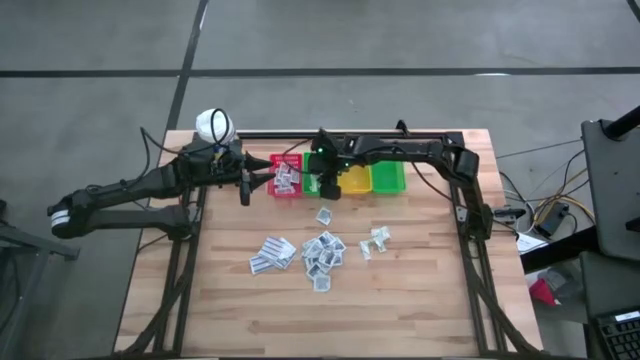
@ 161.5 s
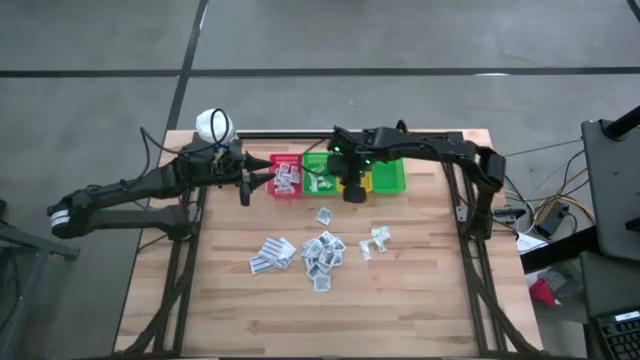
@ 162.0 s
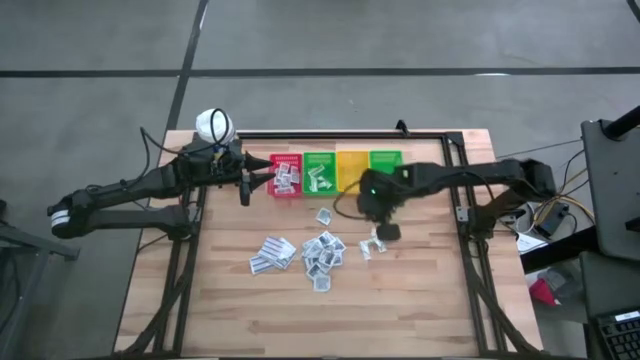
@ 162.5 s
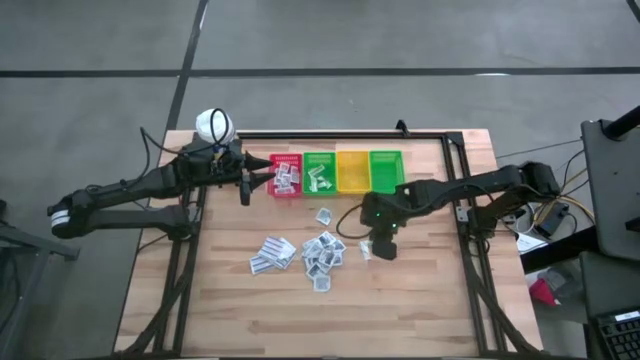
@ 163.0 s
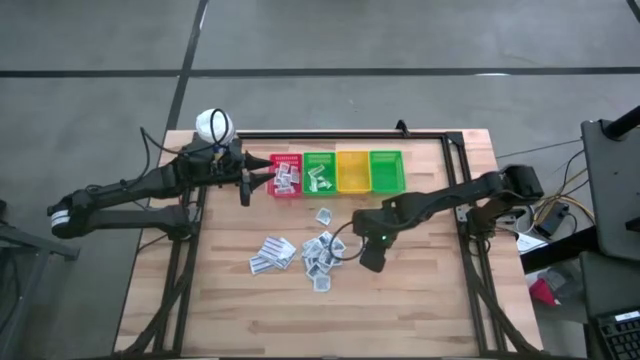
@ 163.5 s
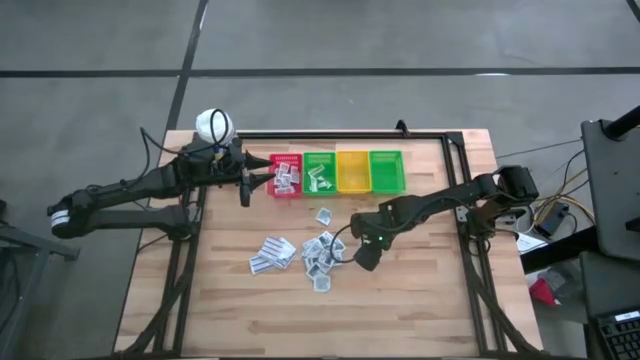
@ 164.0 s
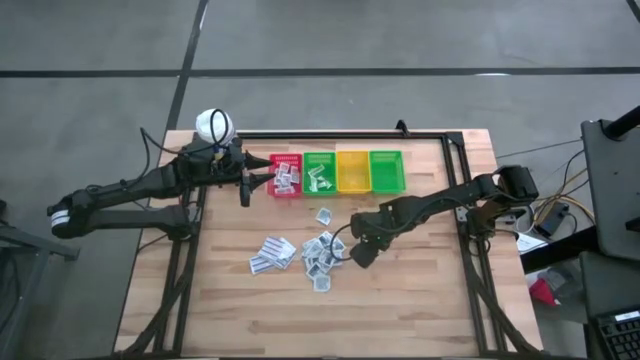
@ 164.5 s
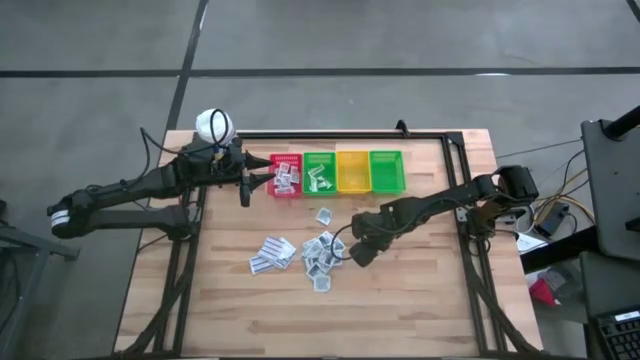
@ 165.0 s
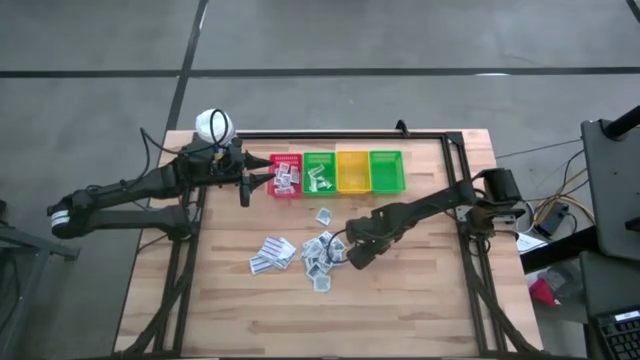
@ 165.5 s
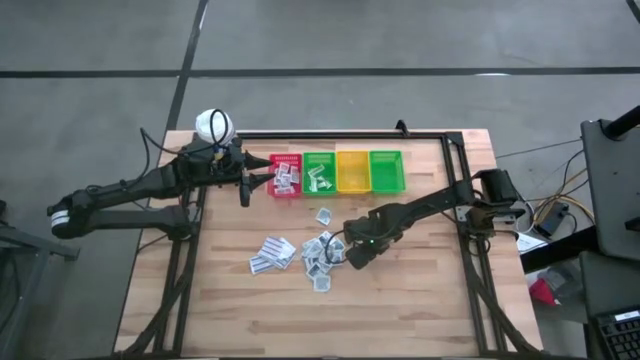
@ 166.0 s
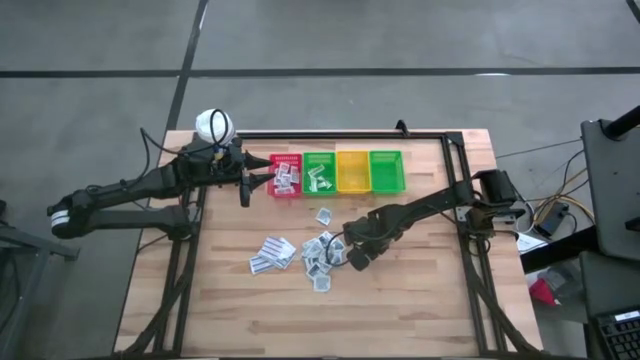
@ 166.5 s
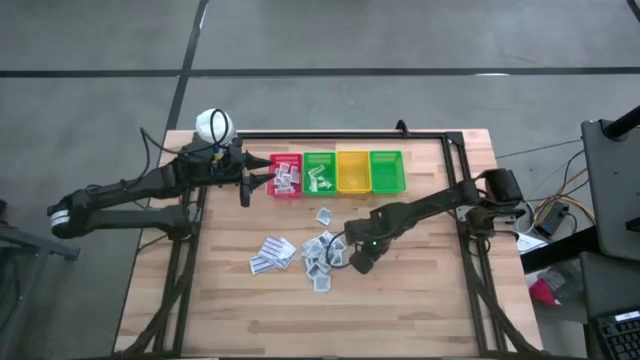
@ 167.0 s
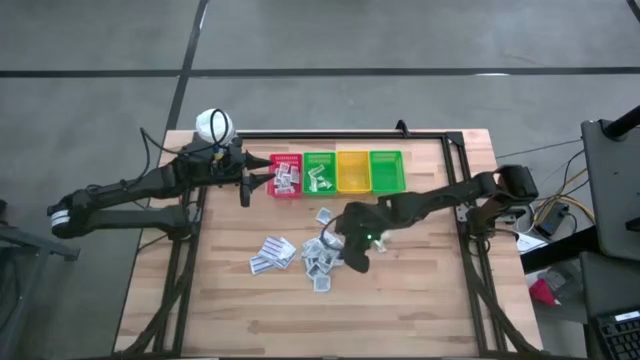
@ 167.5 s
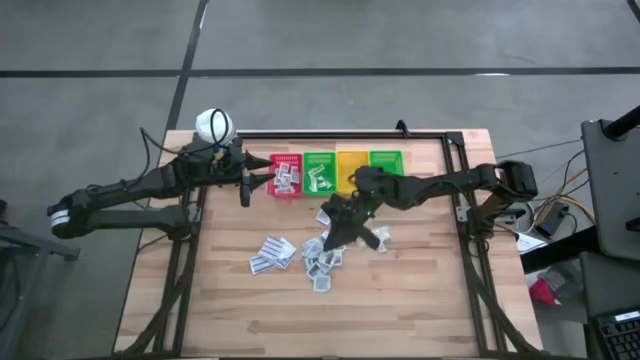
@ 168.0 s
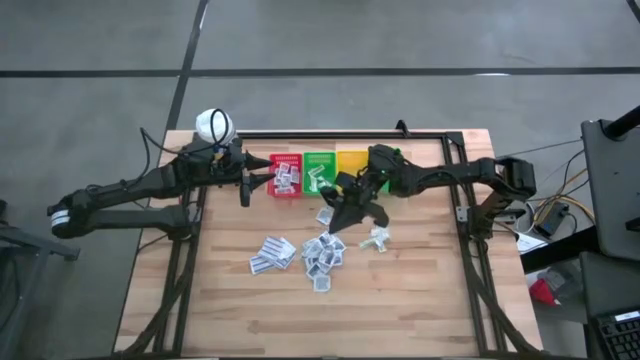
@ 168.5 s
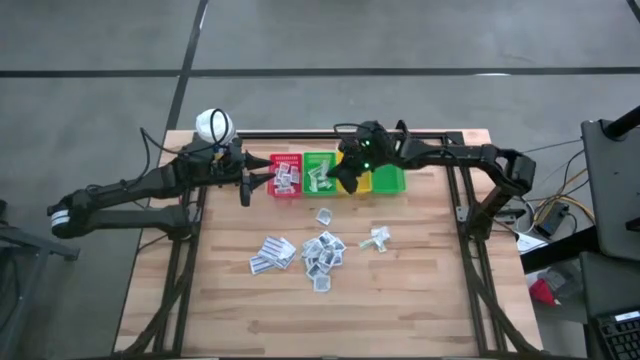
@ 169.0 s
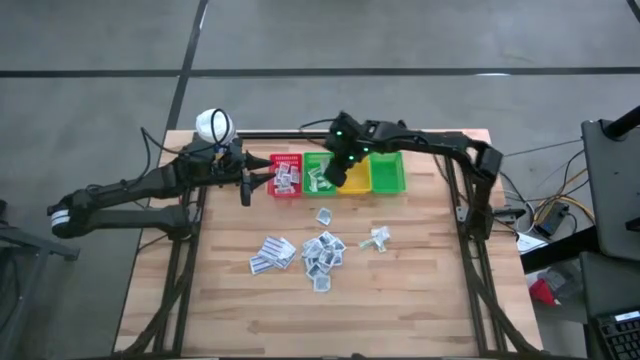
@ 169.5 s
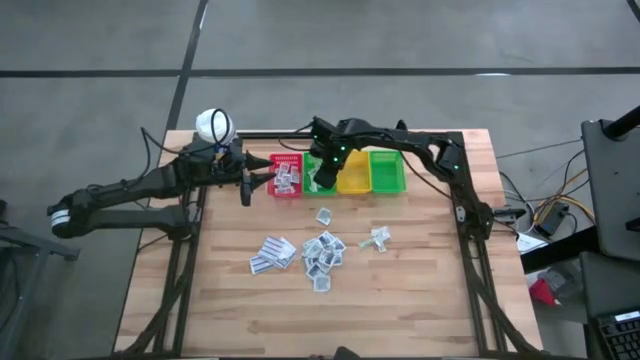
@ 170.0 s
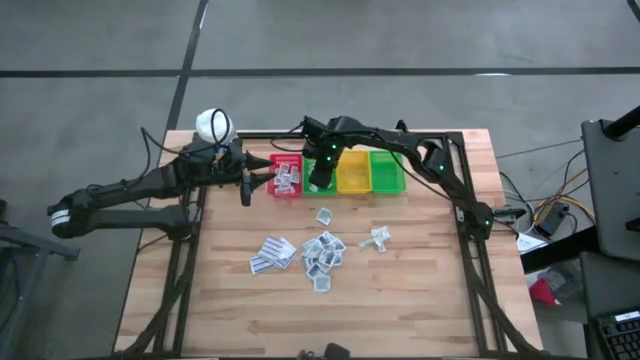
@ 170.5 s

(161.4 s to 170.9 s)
Task: Pick & Place First Aid Supplies
Put the green bandage into the left green bin

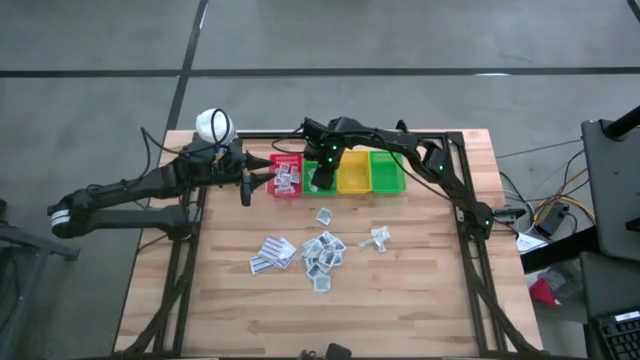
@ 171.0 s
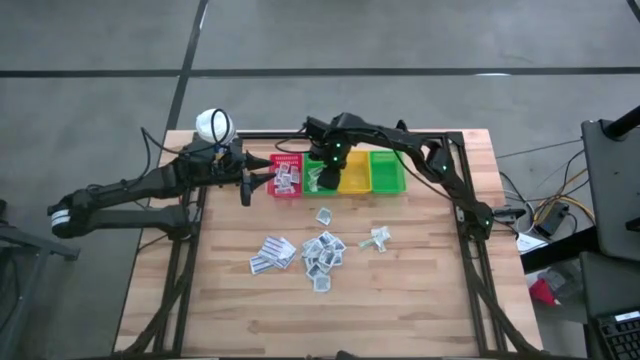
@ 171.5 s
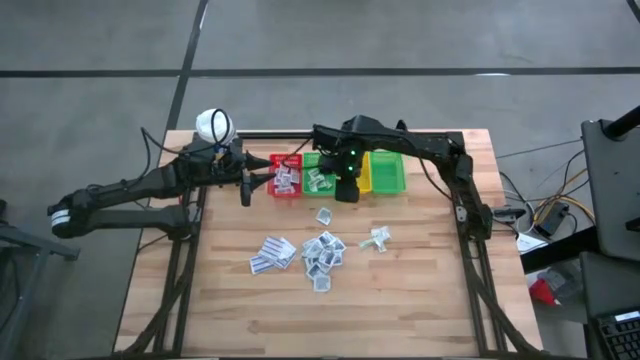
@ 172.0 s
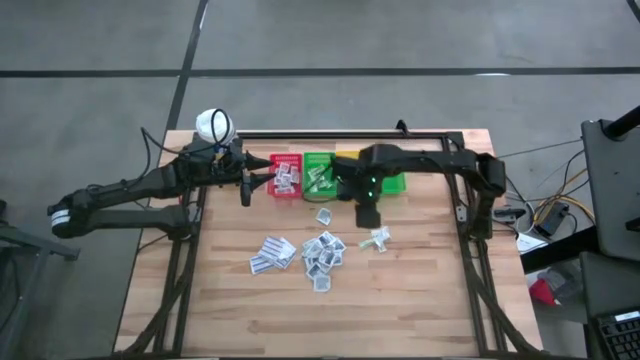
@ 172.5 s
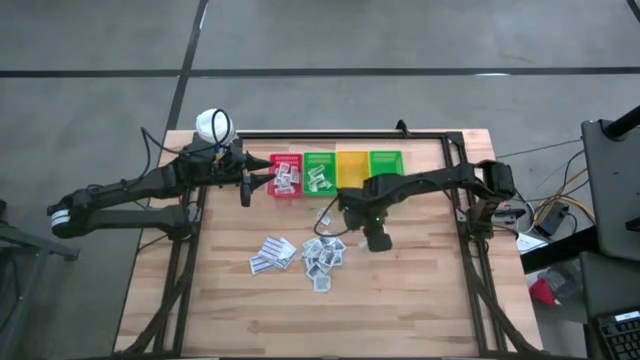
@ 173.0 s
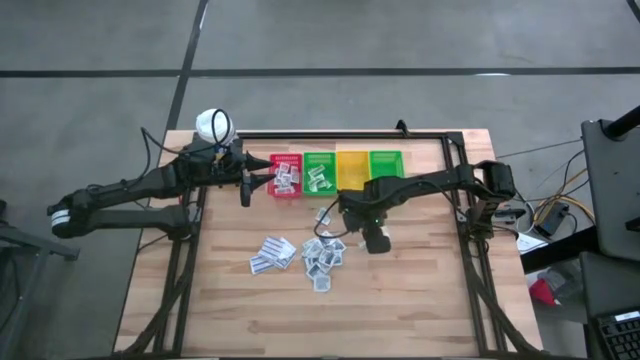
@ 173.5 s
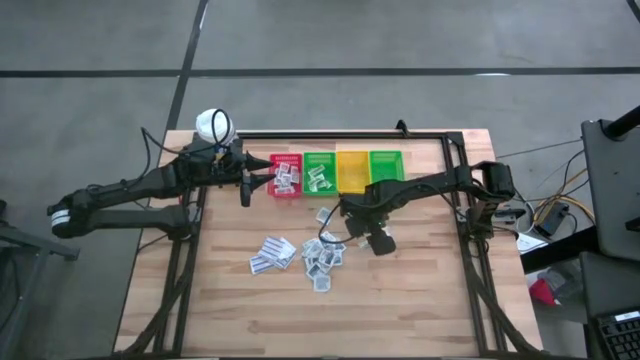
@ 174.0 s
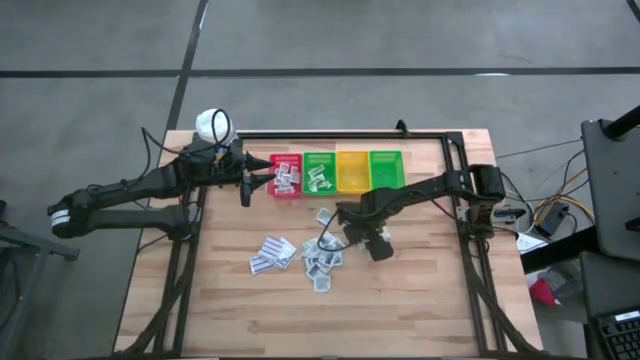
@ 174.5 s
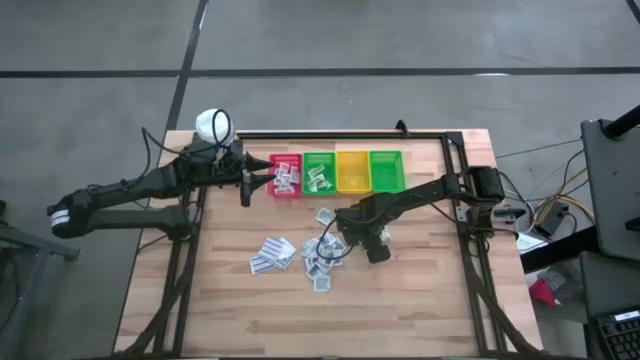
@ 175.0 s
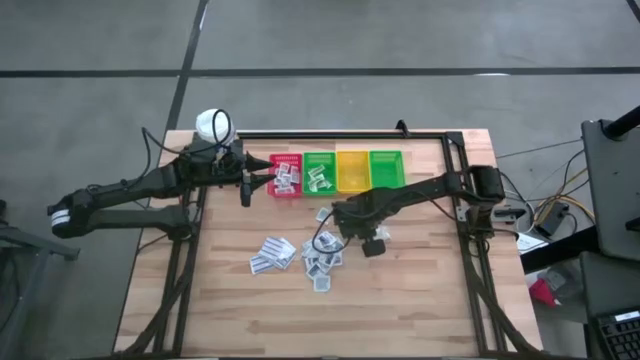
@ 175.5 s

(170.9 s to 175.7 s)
Put the green bandage into the left green bin

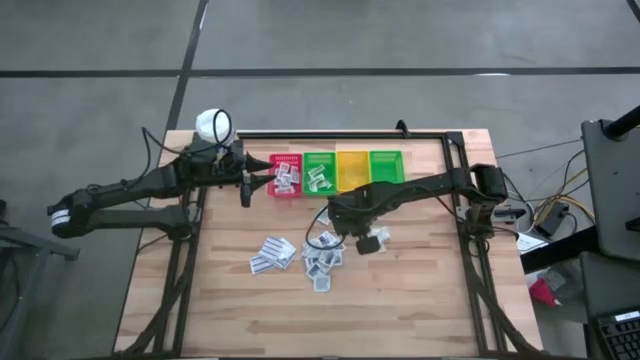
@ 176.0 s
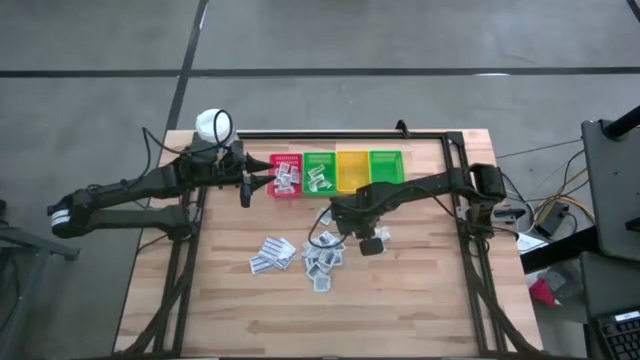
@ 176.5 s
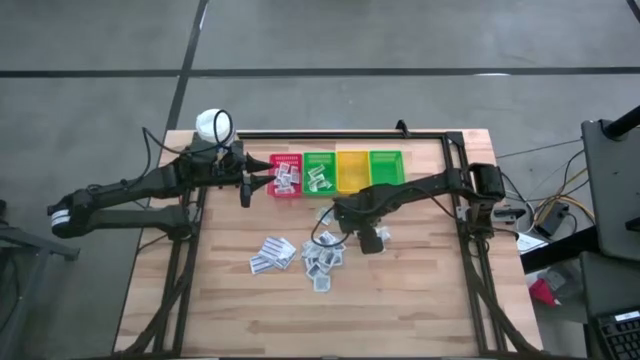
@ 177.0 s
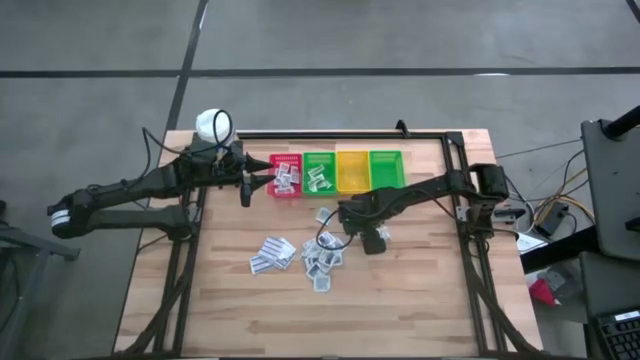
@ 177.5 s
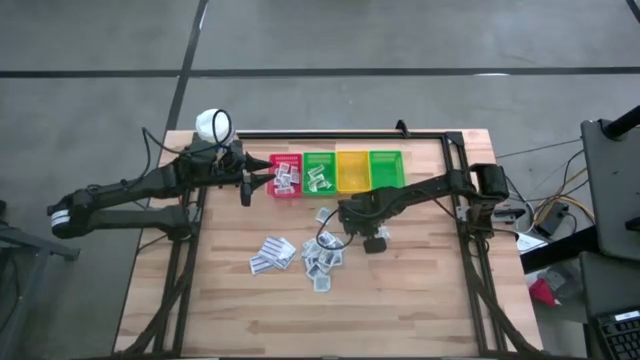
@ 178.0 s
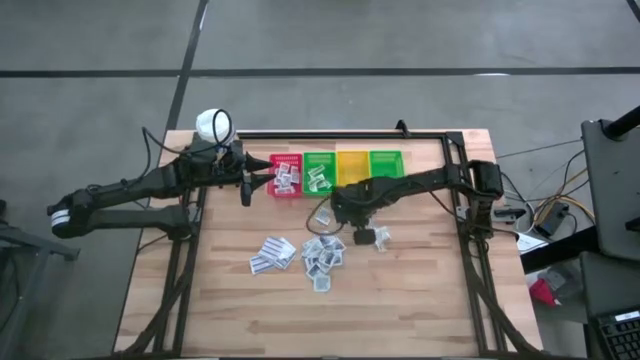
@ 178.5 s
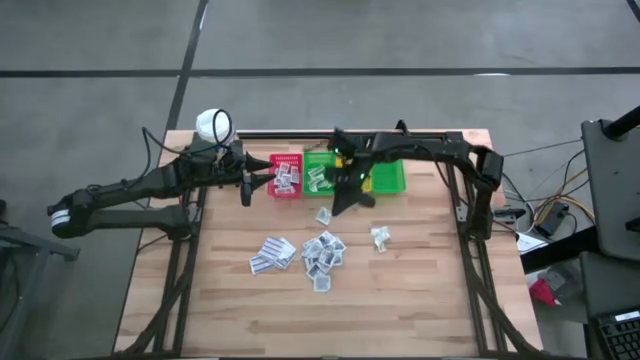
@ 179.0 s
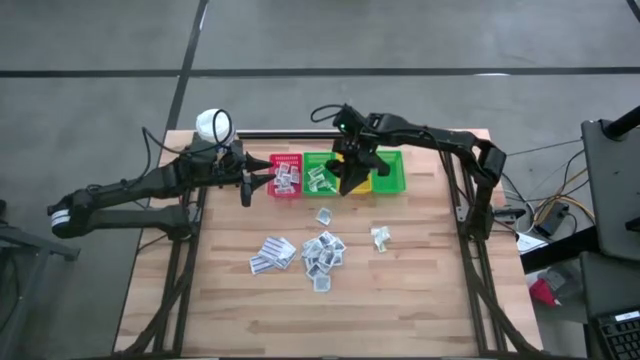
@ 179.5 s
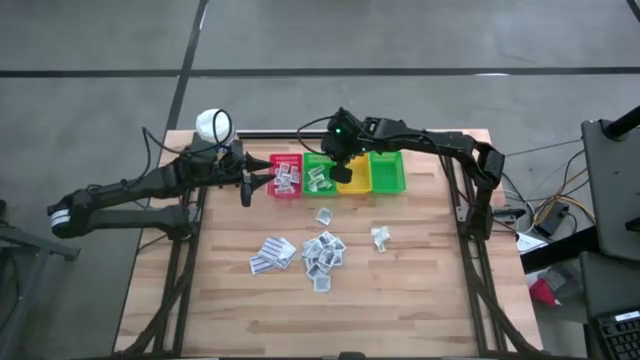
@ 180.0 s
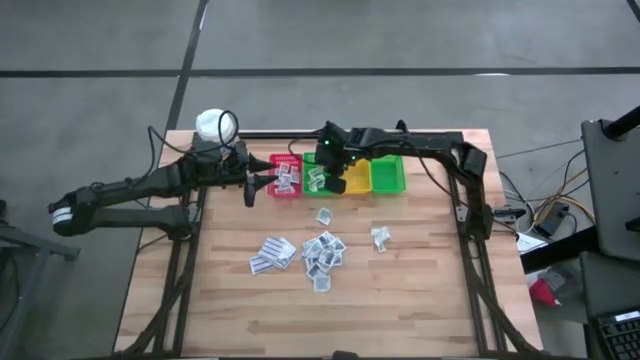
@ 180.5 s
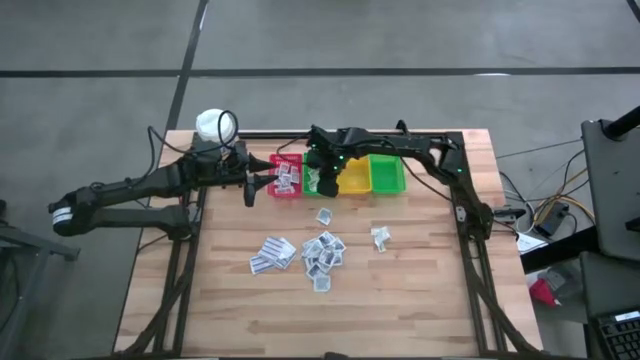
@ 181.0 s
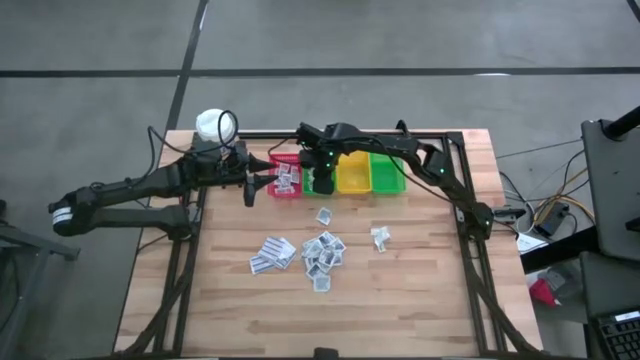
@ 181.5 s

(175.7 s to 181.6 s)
Put the green bandage into the left green bin
